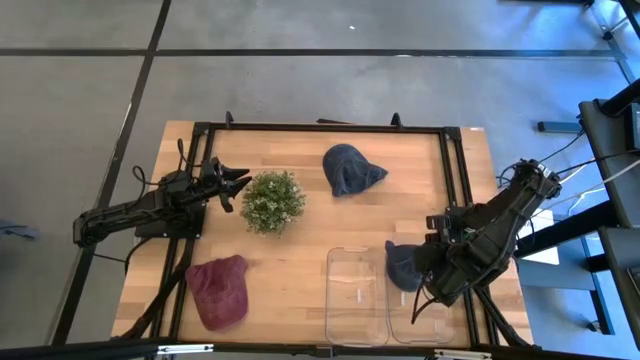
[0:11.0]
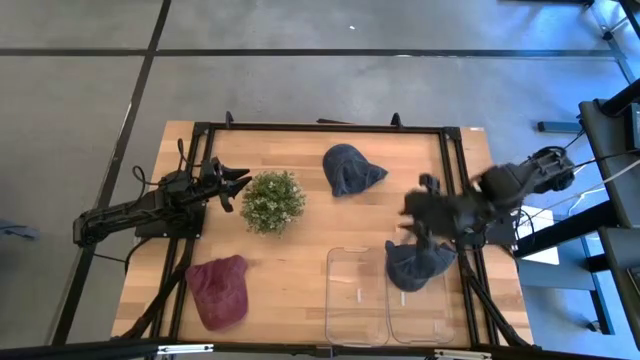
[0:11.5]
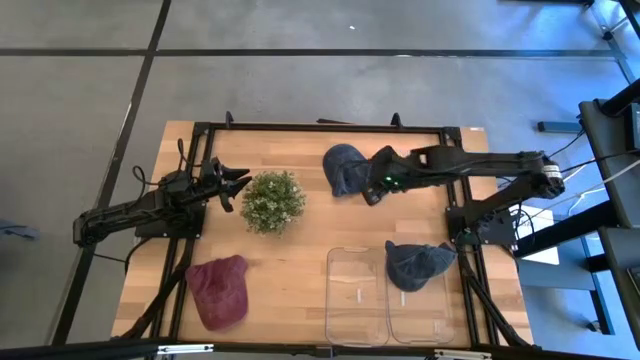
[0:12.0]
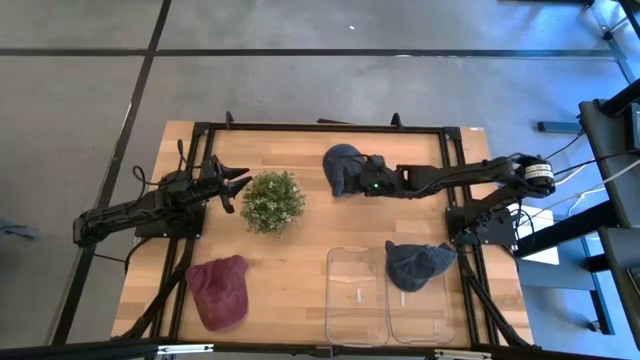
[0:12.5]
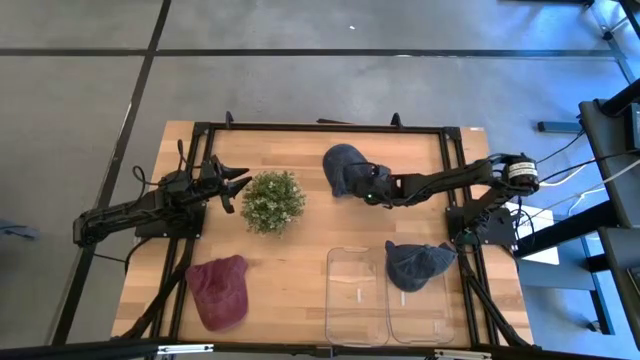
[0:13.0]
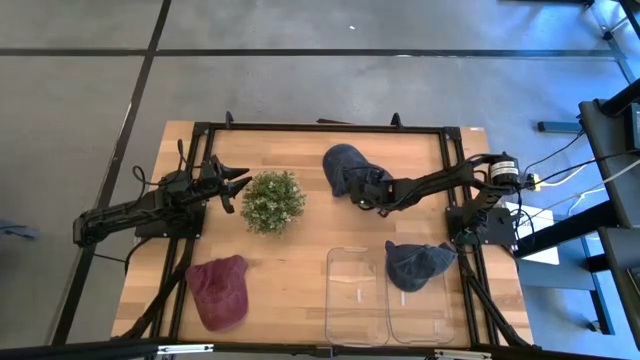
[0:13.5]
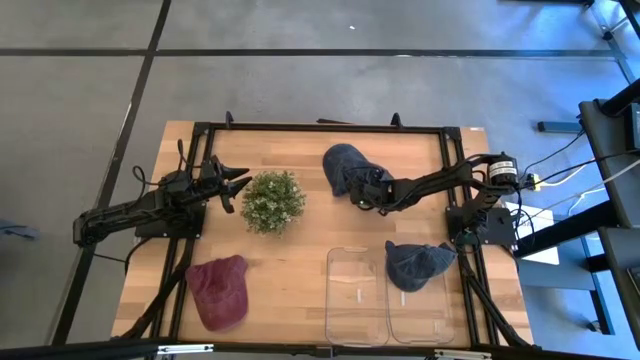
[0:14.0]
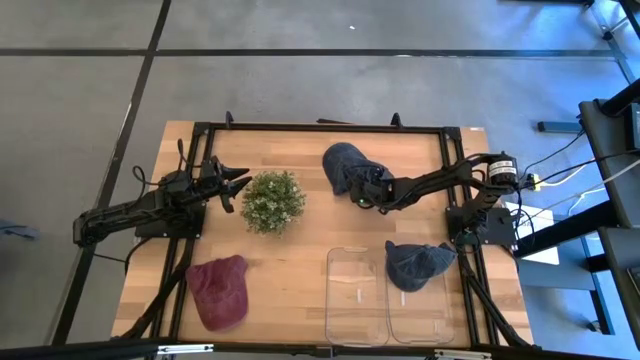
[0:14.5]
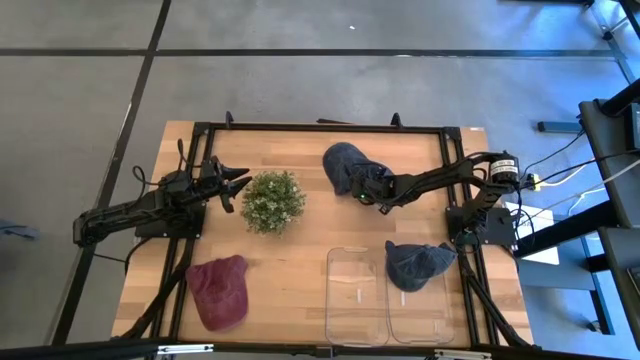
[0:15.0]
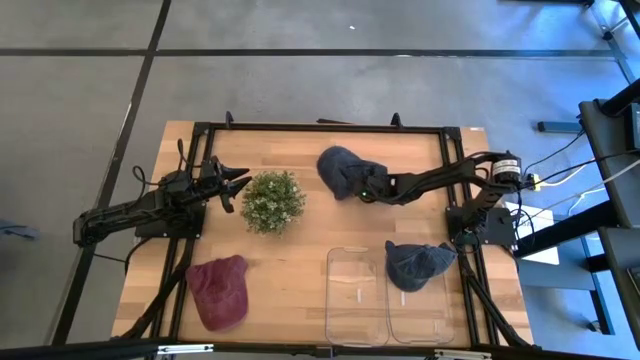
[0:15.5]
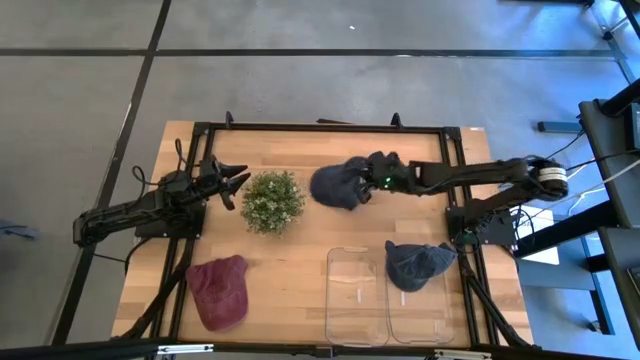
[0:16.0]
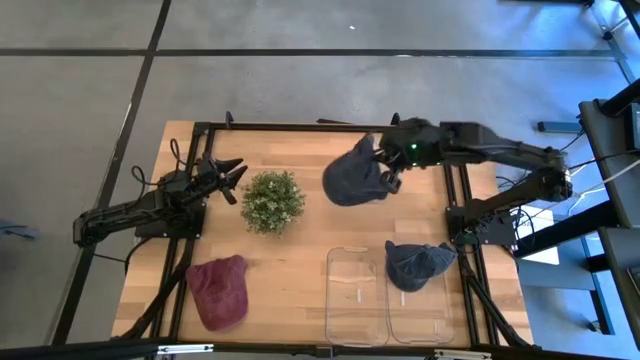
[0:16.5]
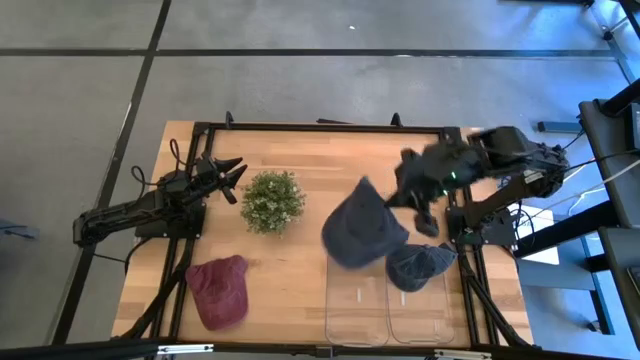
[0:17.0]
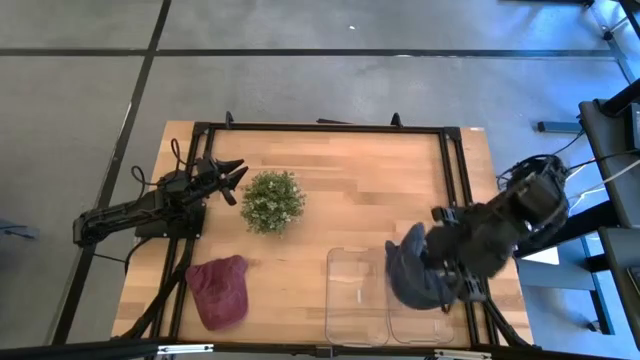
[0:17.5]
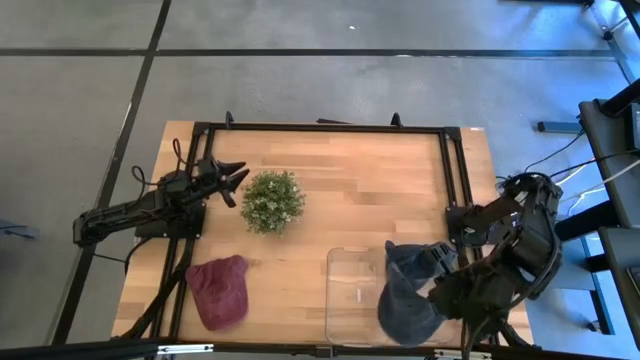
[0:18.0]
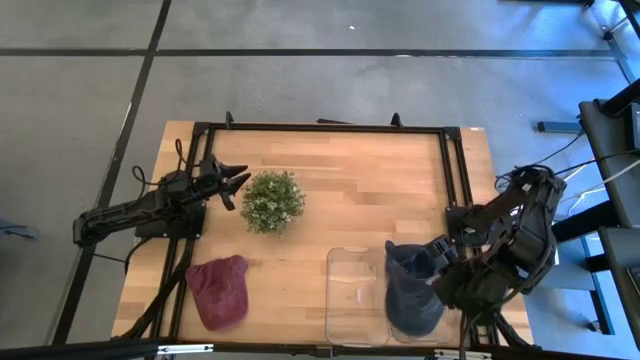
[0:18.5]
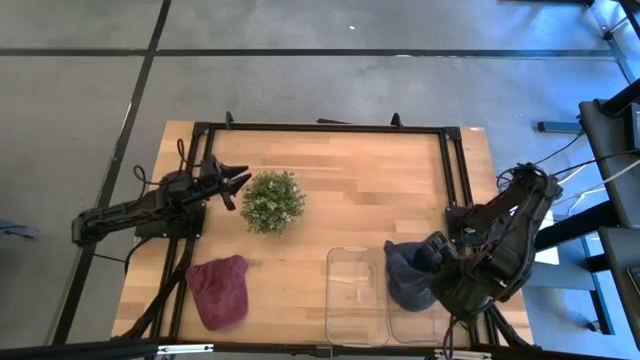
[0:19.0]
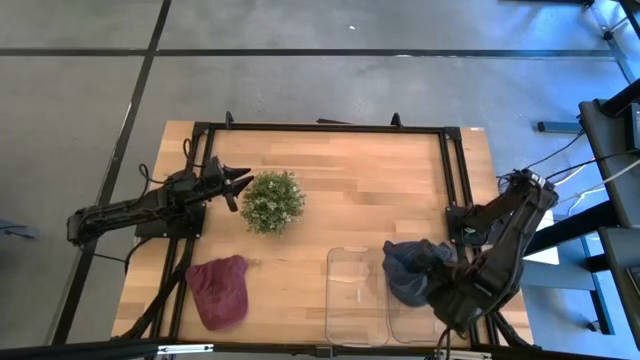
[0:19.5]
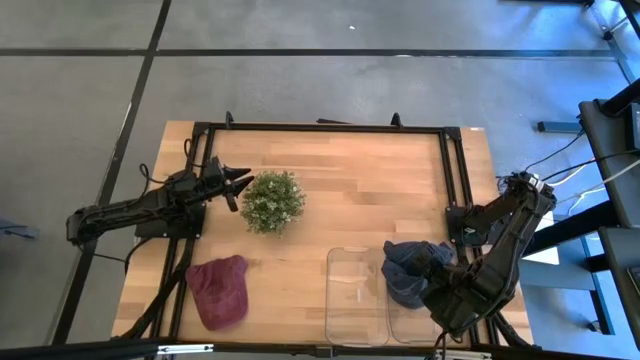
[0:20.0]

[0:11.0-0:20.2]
Task: Pick & Place hat
Put the blue cap into the right transparent bin

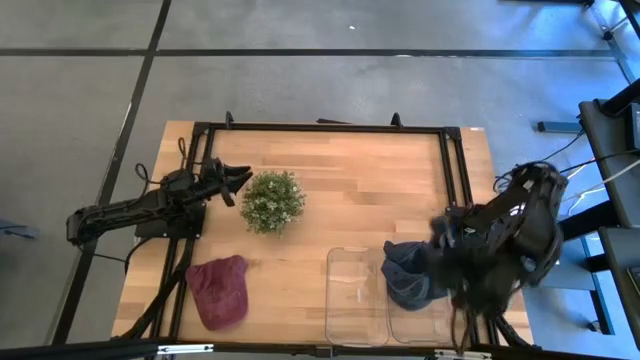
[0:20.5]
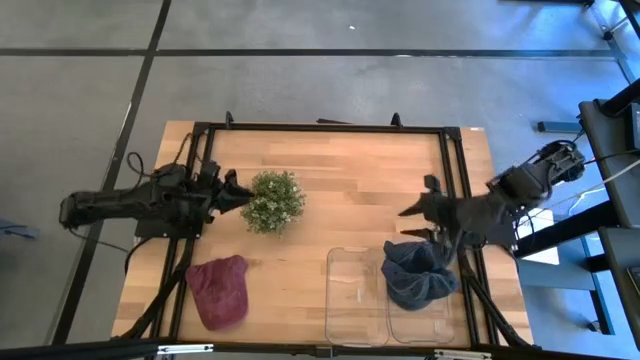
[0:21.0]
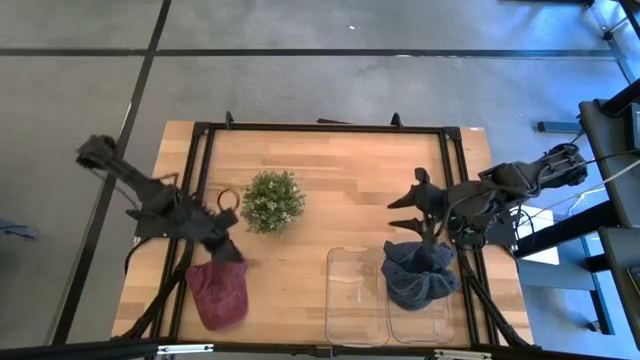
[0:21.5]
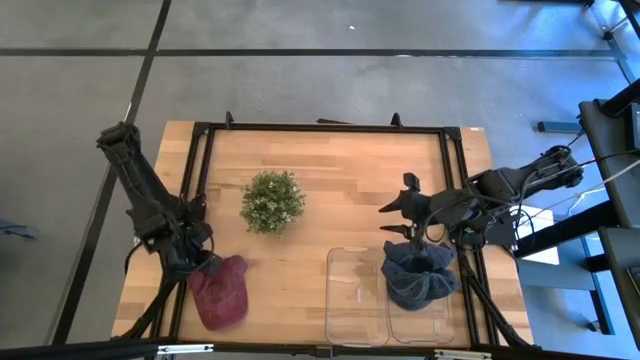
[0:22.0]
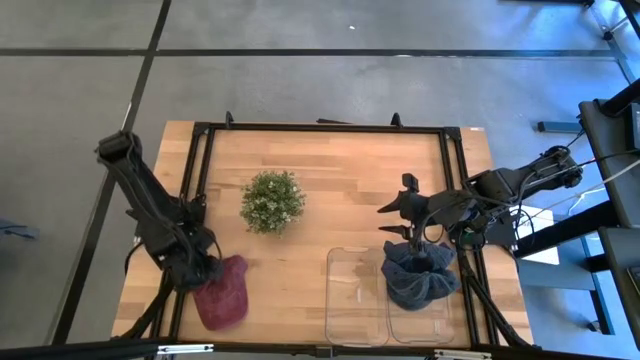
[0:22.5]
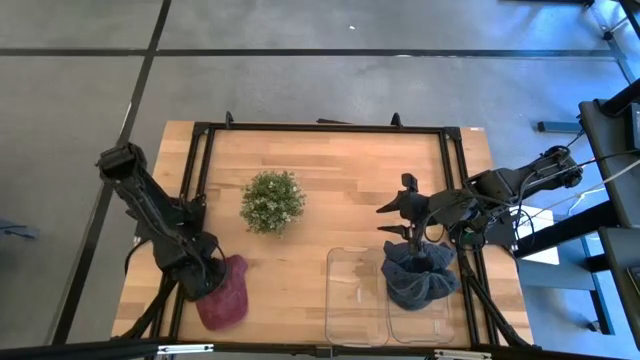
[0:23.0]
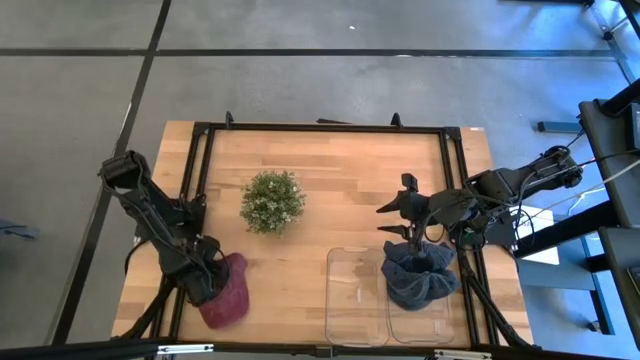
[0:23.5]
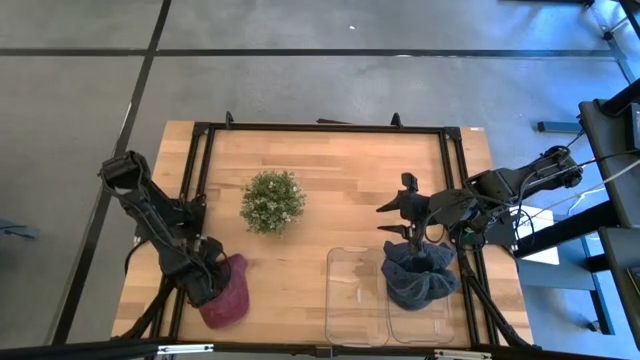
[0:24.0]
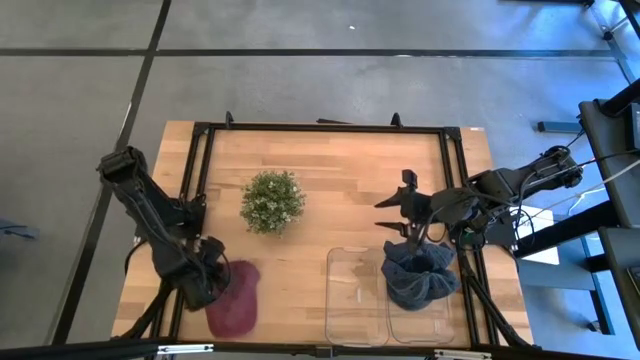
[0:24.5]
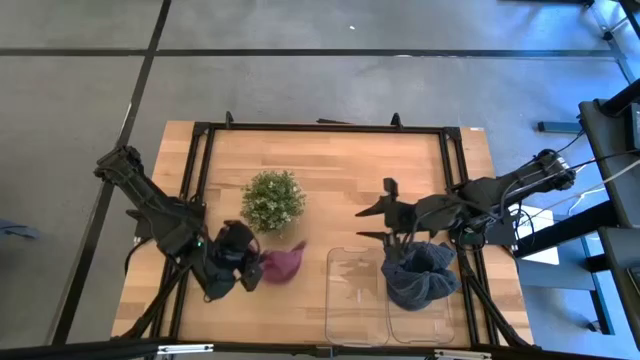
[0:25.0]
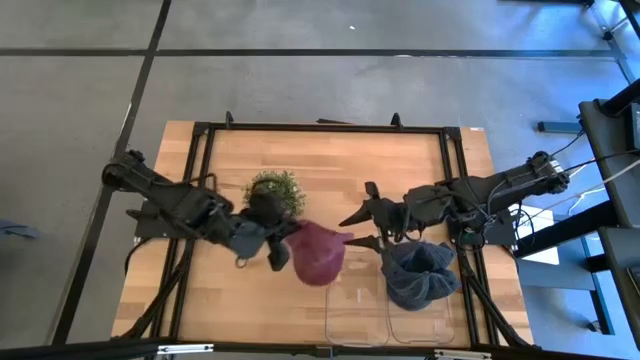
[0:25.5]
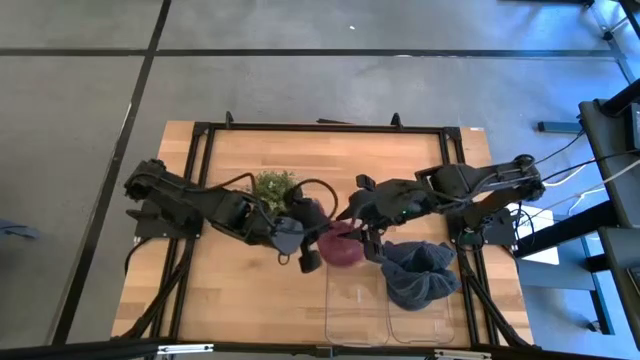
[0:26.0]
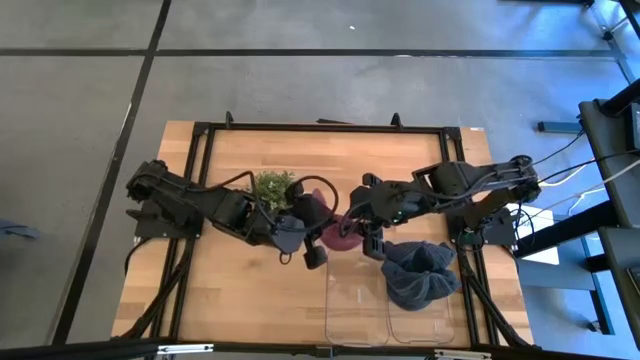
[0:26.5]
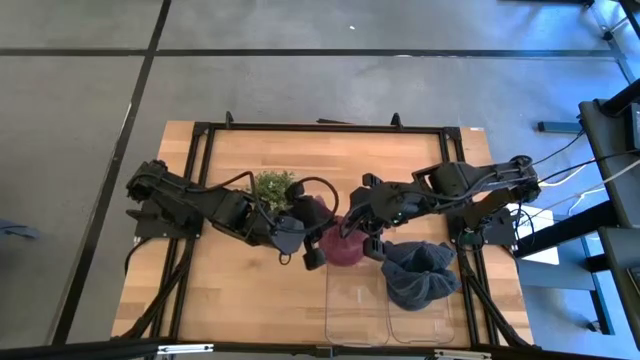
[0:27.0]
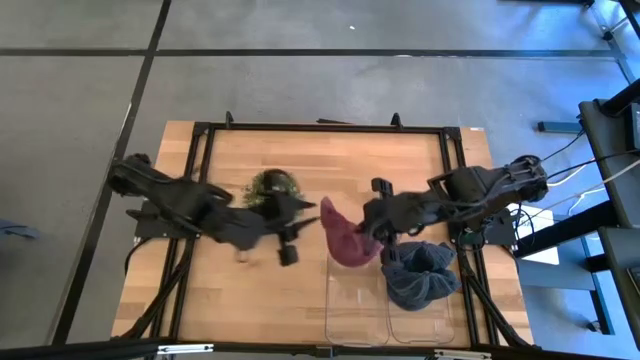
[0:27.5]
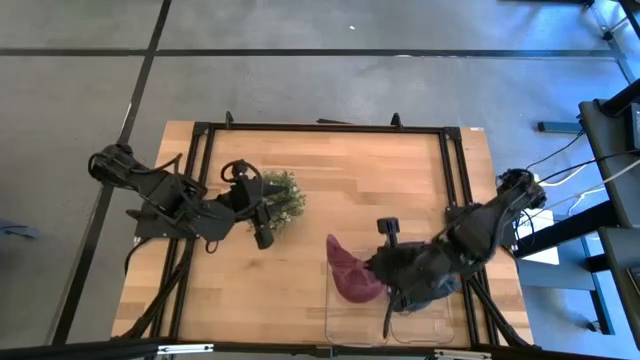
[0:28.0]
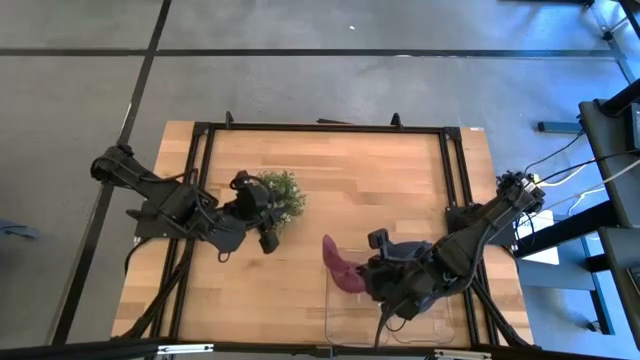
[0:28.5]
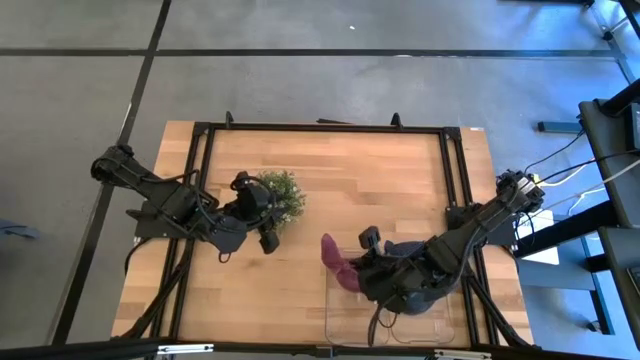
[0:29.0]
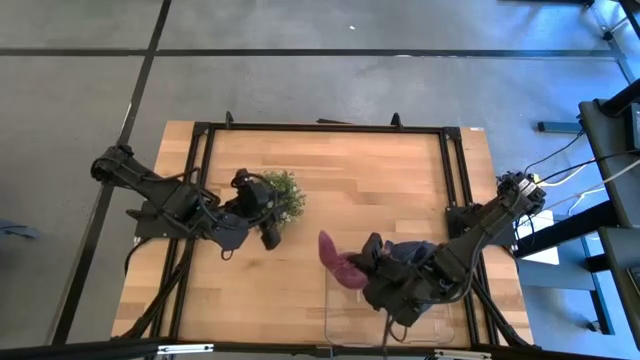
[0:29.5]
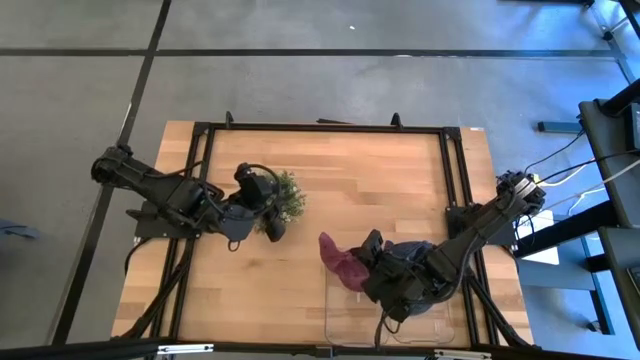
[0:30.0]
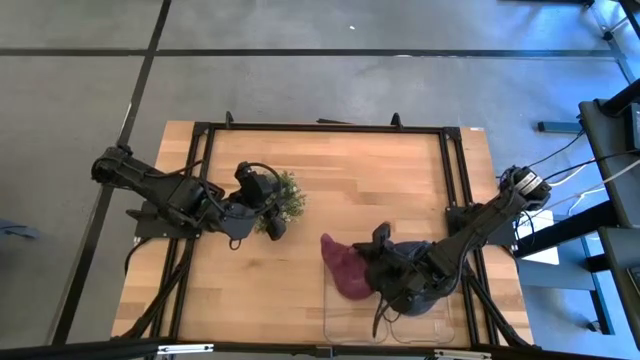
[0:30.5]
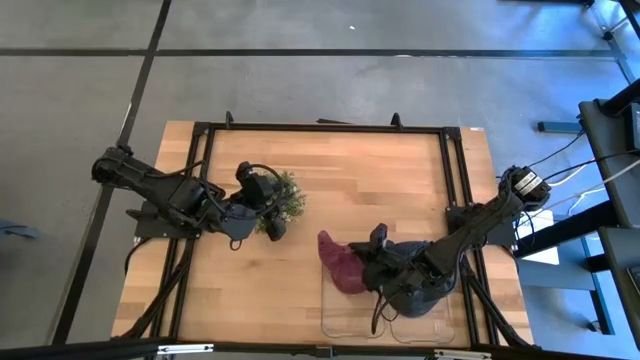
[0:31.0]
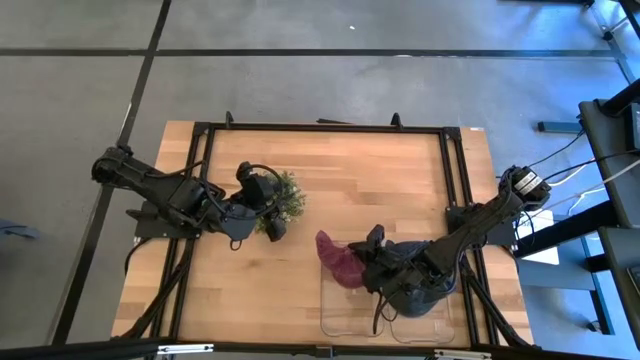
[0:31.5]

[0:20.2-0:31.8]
Put the red cap into the left transparent bin
